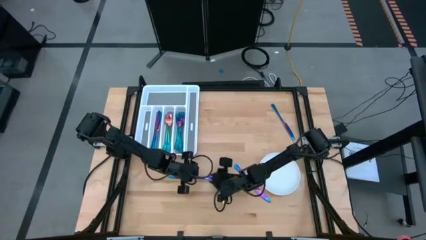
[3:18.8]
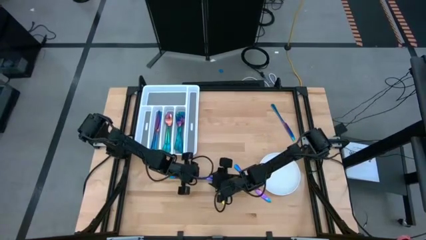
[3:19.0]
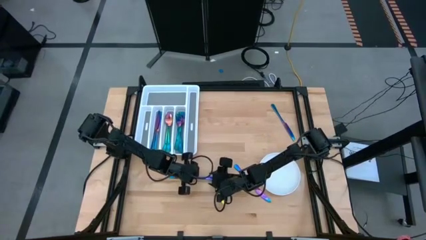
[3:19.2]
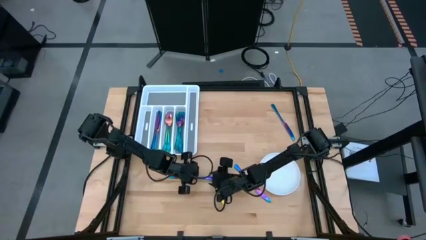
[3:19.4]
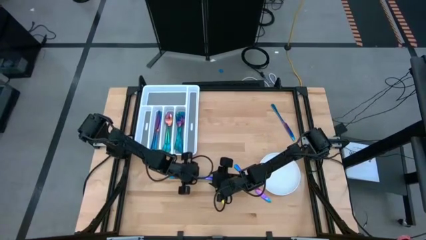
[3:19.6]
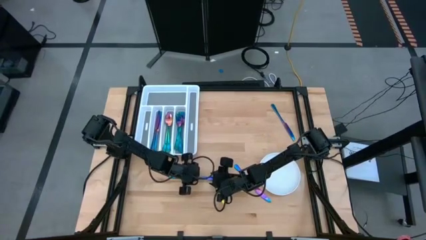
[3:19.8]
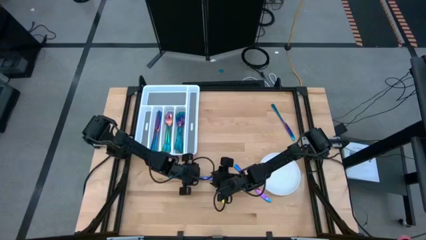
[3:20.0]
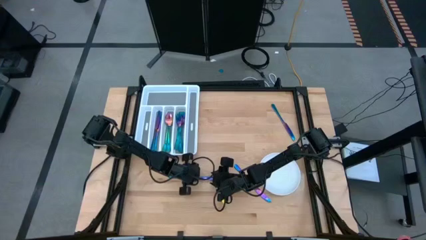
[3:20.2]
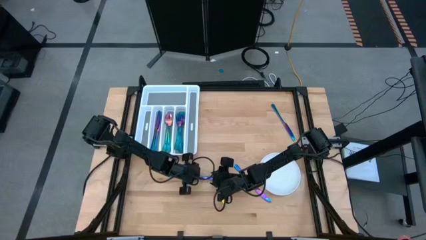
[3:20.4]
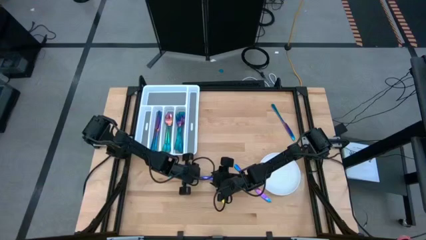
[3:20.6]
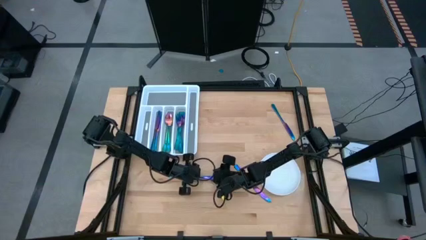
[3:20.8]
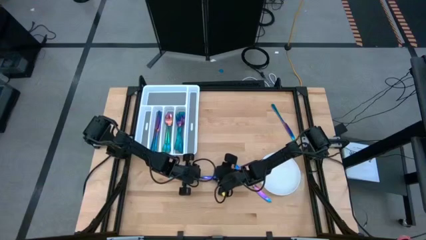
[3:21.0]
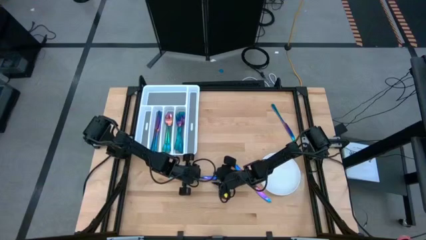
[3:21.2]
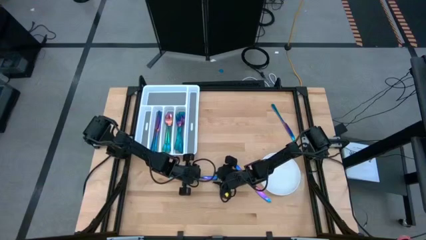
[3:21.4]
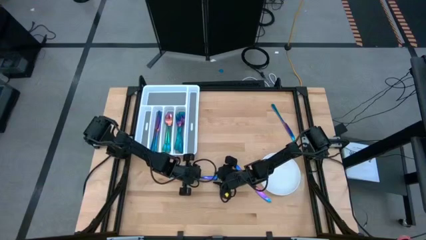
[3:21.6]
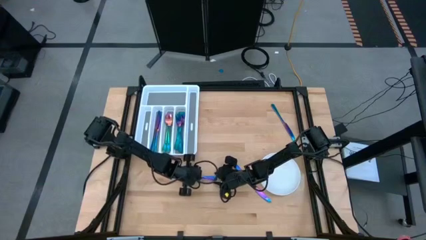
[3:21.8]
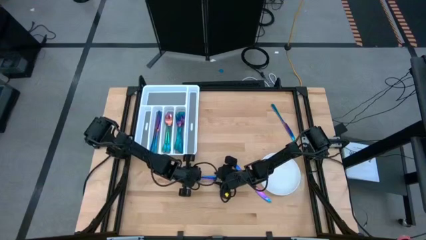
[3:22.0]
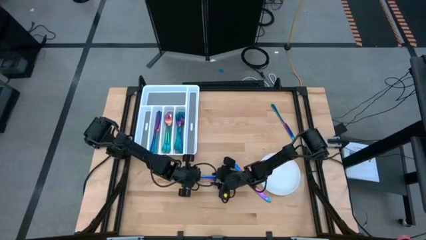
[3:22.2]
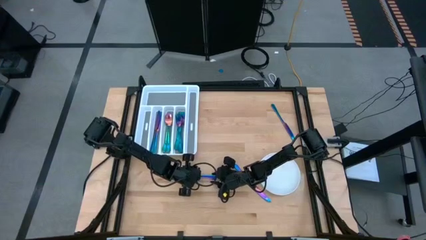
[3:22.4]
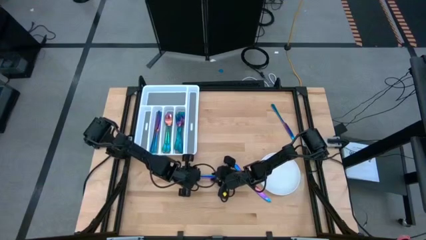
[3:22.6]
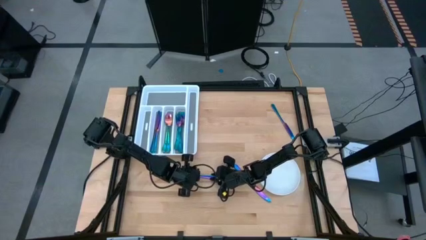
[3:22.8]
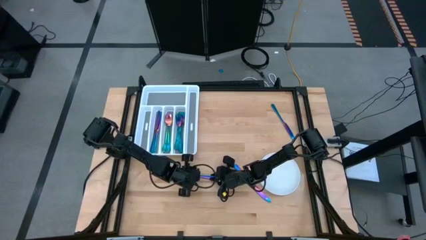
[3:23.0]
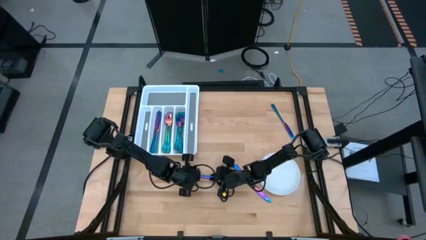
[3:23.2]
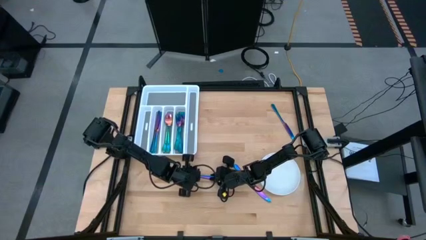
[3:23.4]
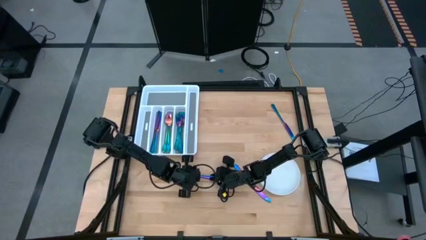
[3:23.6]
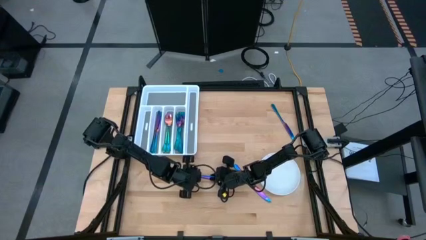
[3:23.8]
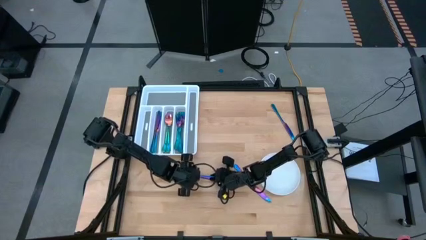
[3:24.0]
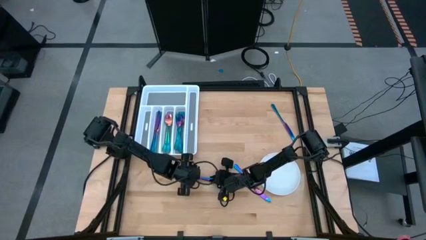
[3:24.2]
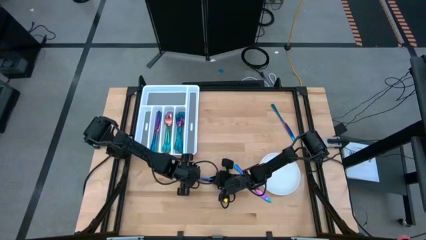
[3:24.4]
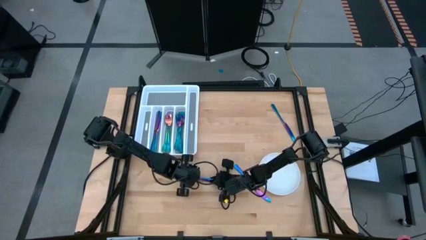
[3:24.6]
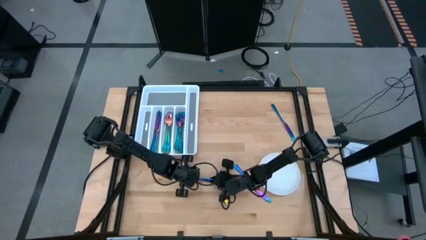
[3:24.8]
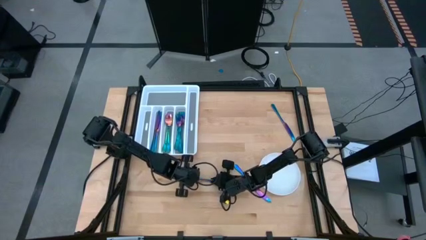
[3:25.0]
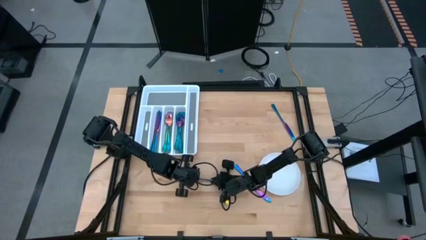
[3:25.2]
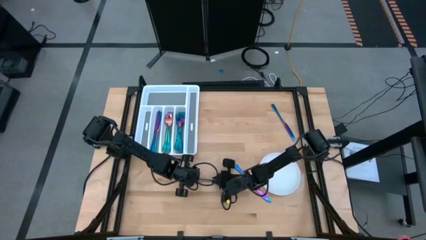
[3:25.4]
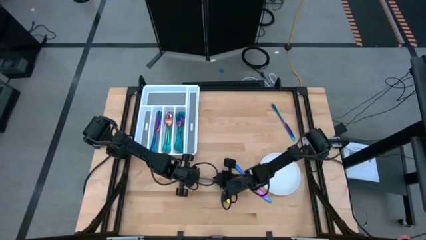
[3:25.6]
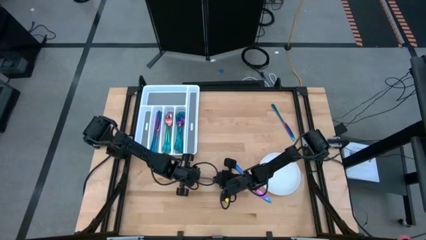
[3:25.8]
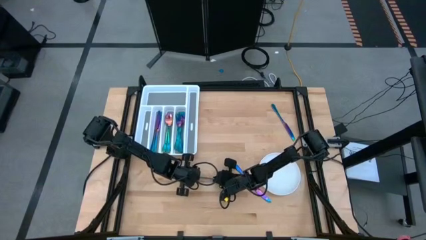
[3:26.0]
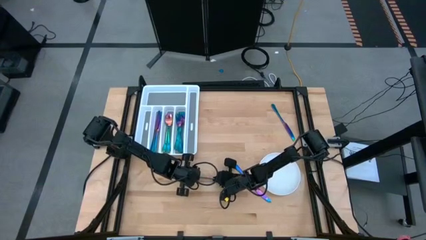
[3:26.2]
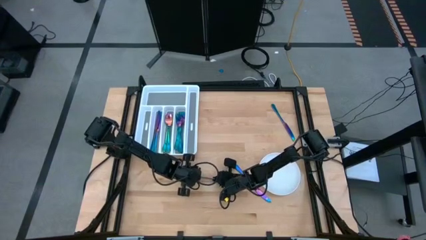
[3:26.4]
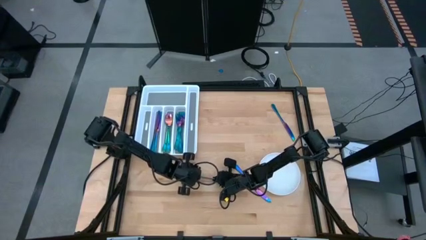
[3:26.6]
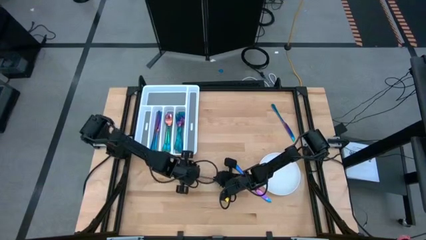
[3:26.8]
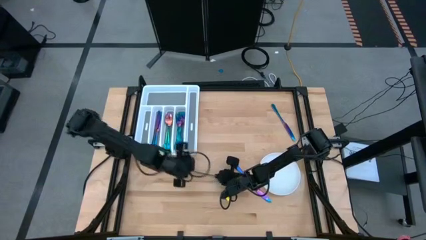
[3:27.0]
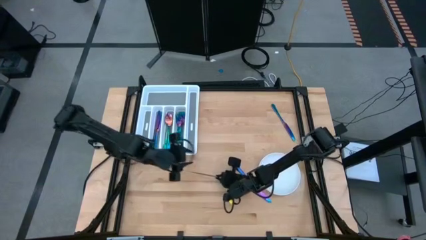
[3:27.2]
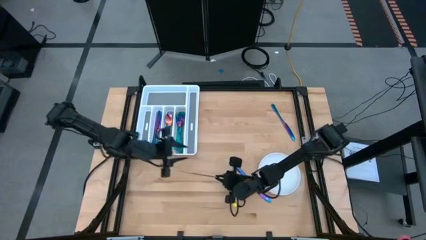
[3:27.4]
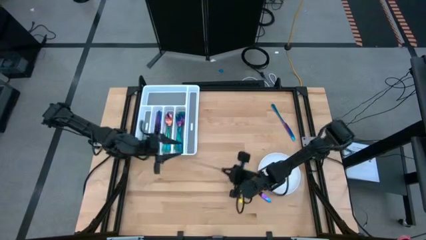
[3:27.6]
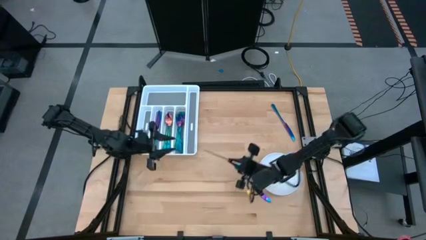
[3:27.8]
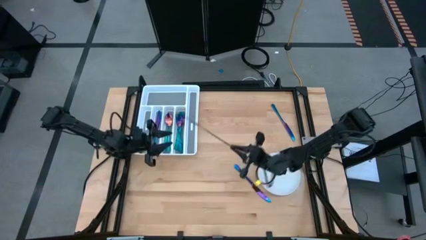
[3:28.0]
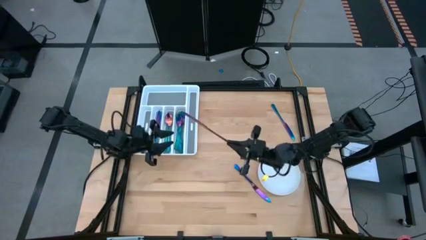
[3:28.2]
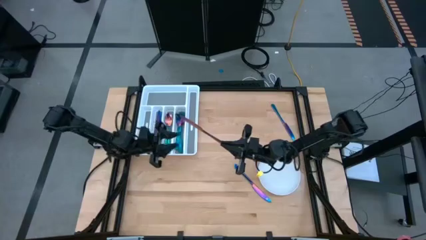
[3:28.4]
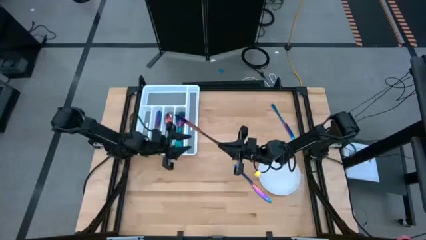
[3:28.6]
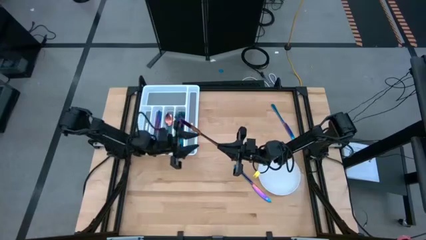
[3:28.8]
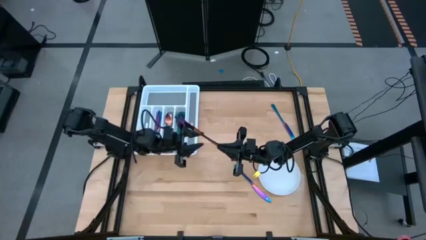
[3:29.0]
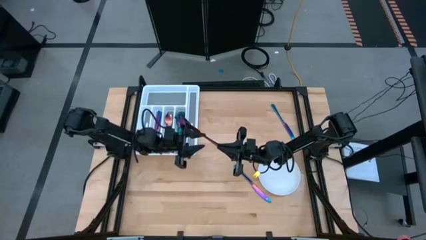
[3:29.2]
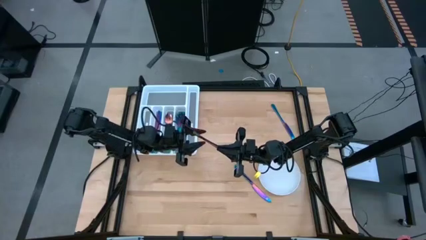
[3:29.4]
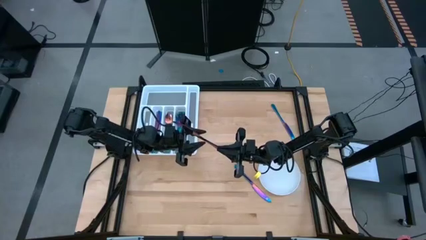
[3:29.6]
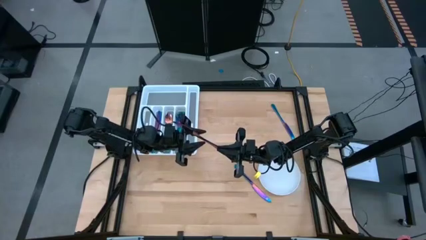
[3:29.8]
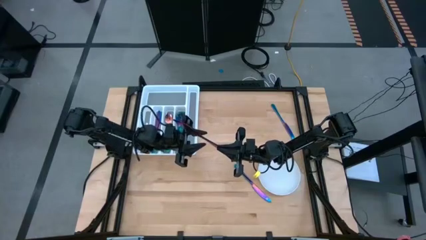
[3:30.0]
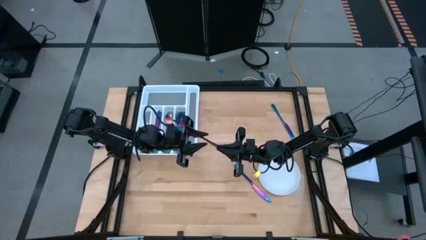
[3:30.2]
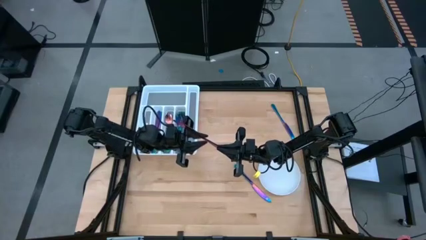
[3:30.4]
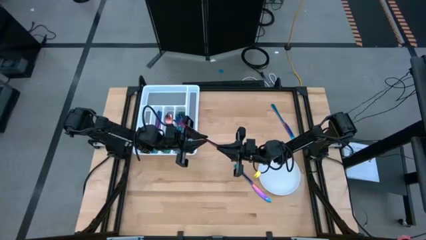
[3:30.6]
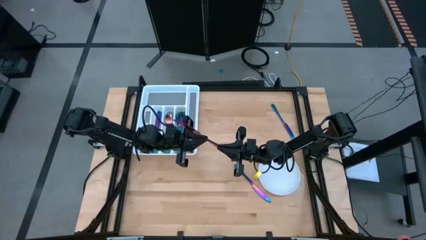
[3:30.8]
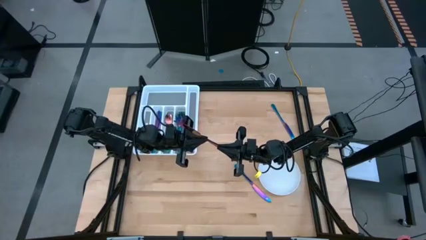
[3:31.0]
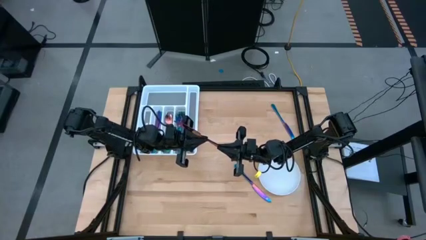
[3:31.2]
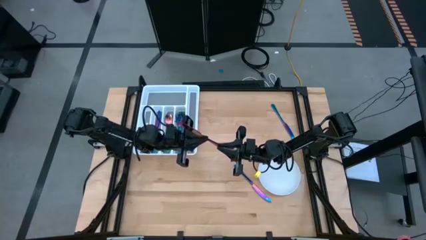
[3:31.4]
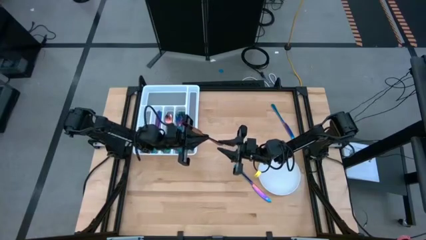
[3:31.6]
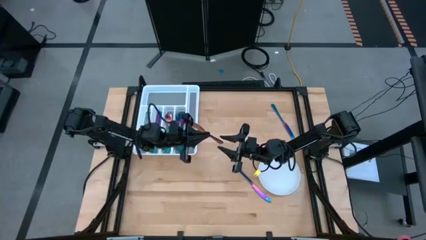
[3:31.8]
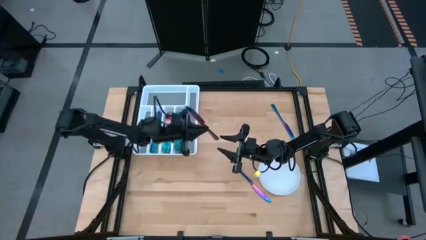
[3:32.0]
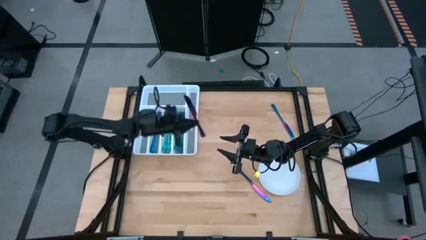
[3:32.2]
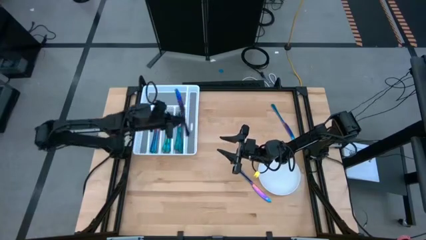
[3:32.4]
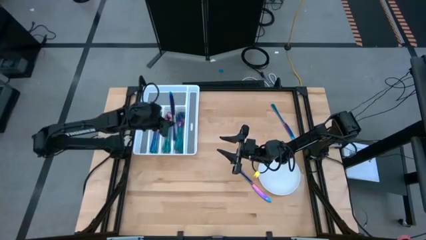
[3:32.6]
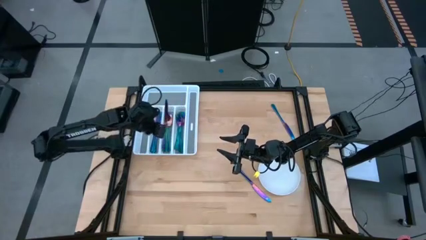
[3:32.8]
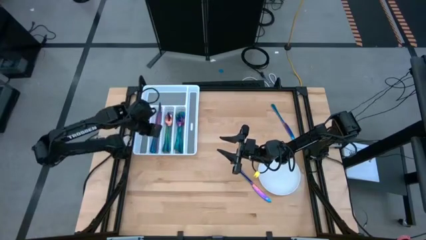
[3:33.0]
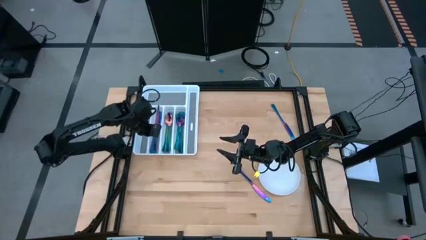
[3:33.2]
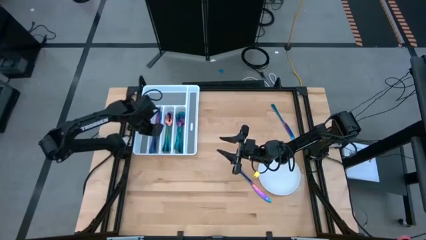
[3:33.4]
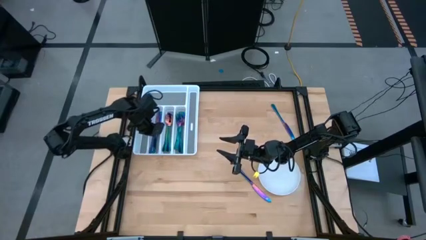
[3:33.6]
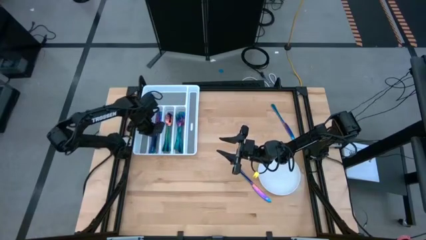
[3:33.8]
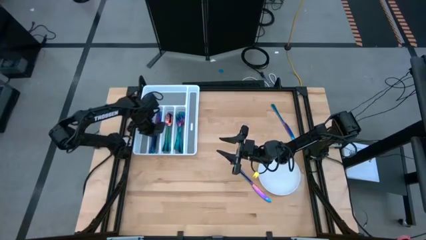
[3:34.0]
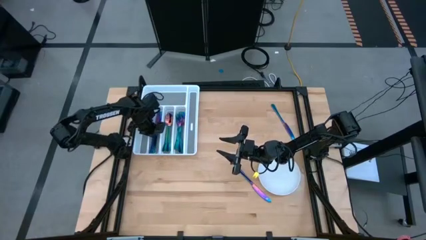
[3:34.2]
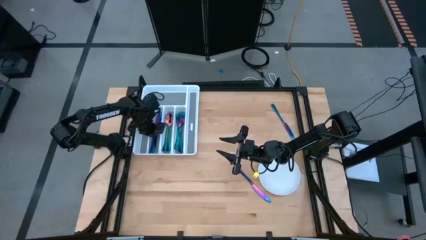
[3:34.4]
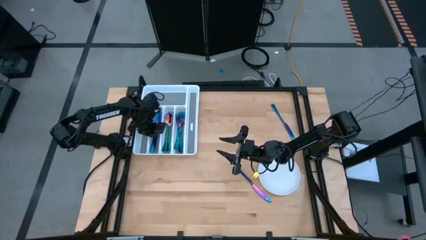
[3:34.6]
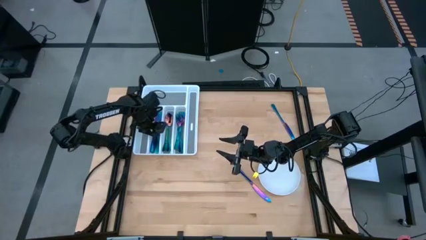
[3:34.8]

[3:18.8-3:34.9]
Task: Sort silverware
Put the iridescent knife into the white silverware tray
